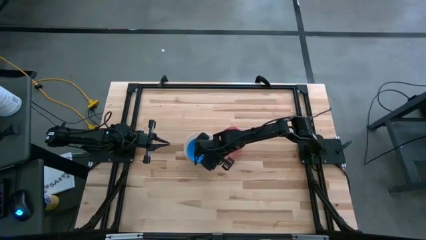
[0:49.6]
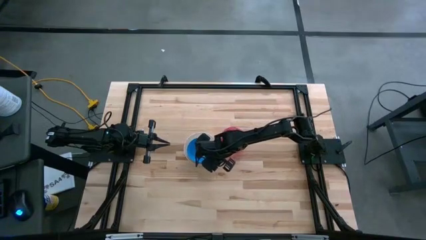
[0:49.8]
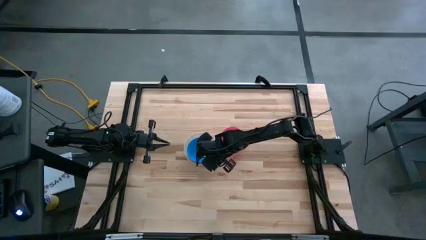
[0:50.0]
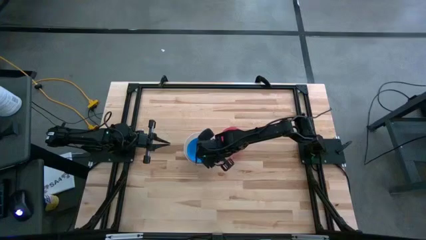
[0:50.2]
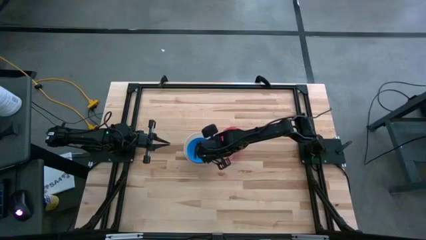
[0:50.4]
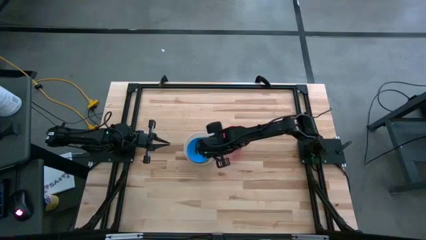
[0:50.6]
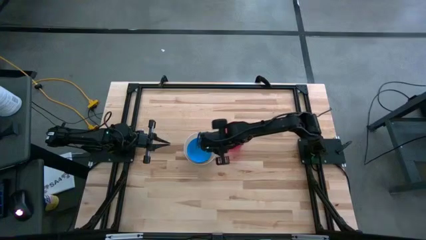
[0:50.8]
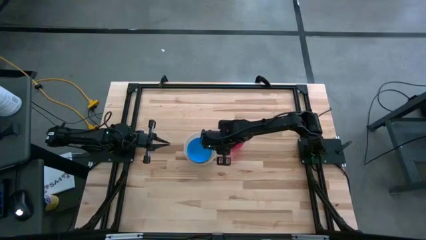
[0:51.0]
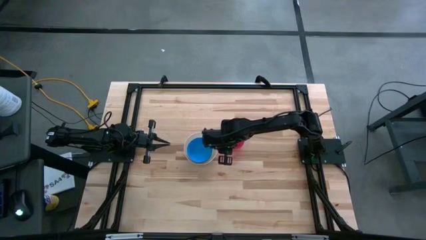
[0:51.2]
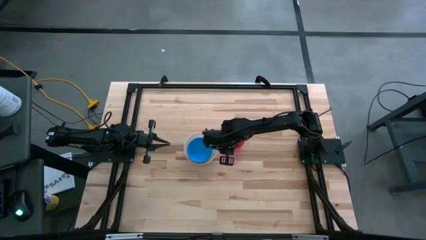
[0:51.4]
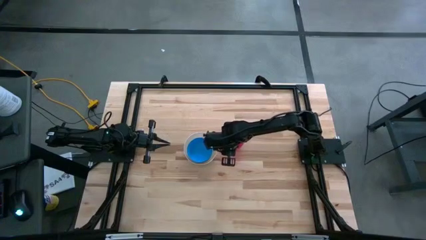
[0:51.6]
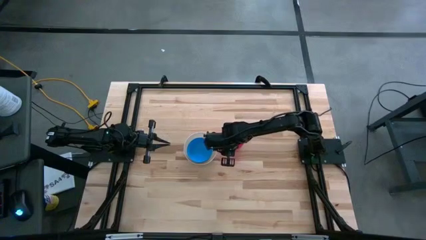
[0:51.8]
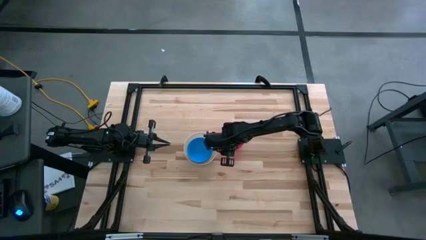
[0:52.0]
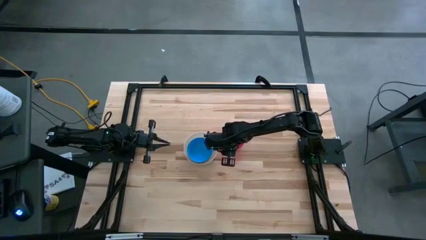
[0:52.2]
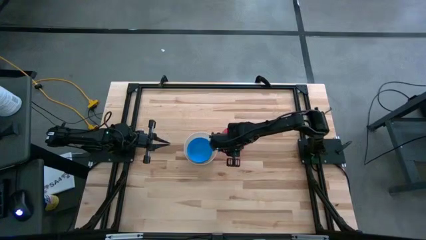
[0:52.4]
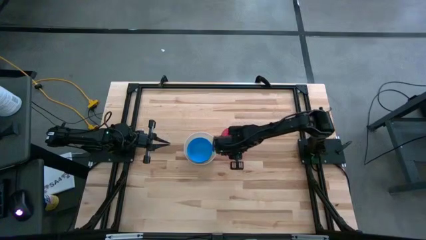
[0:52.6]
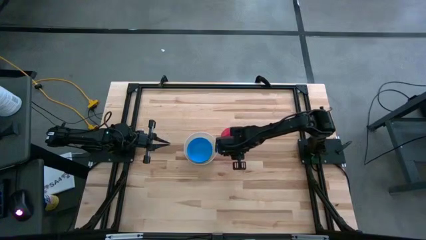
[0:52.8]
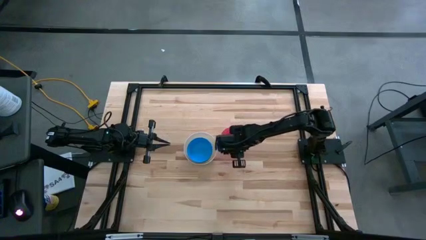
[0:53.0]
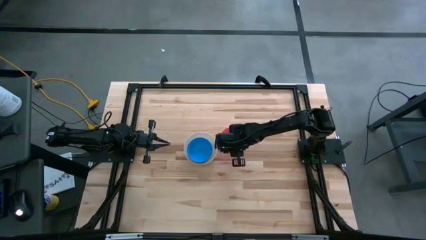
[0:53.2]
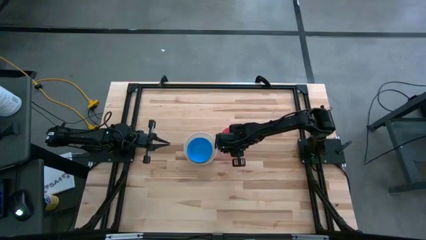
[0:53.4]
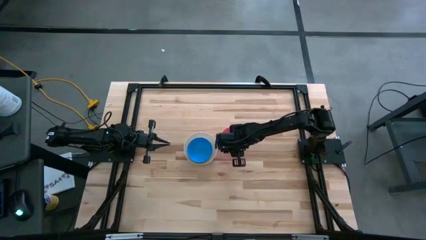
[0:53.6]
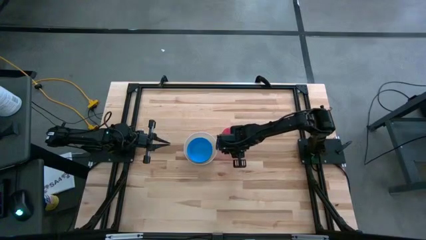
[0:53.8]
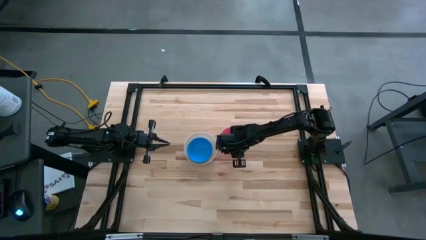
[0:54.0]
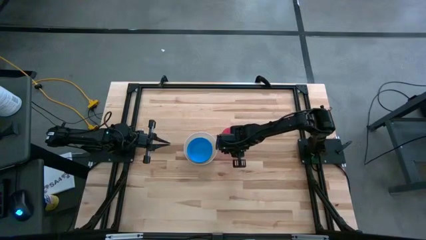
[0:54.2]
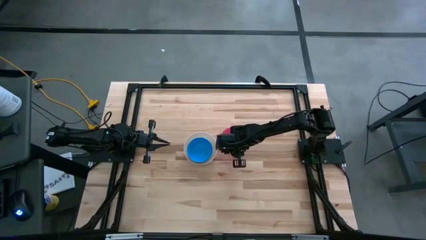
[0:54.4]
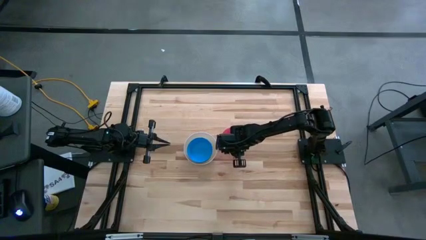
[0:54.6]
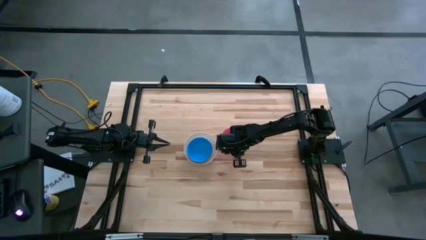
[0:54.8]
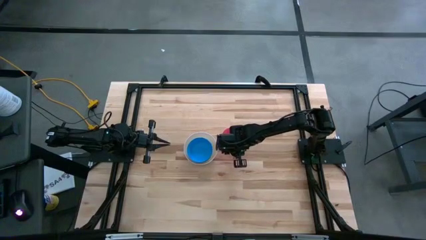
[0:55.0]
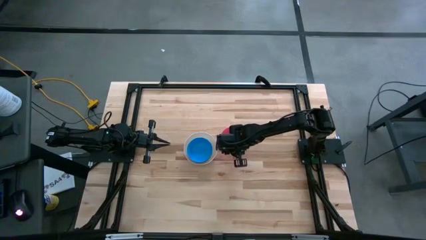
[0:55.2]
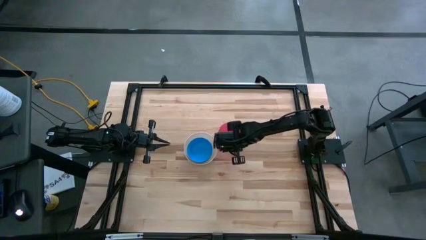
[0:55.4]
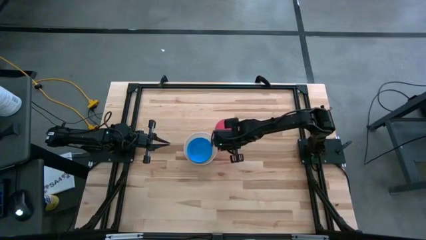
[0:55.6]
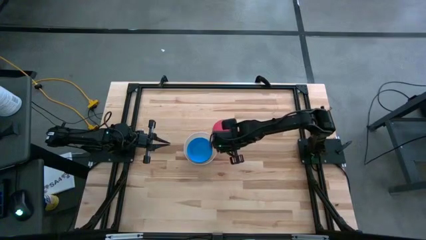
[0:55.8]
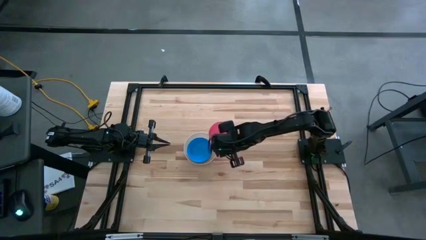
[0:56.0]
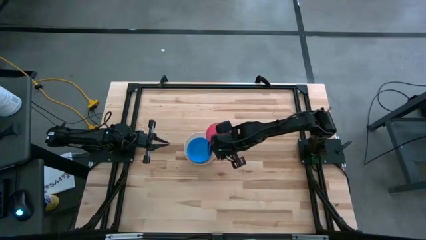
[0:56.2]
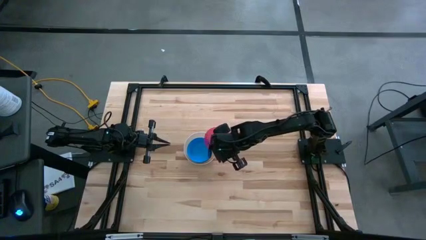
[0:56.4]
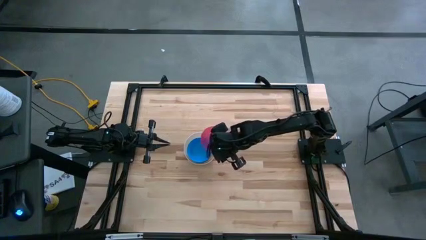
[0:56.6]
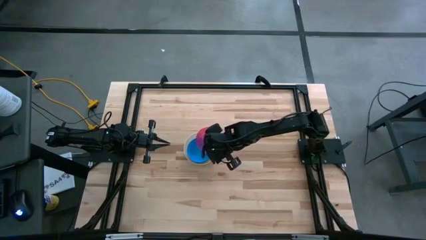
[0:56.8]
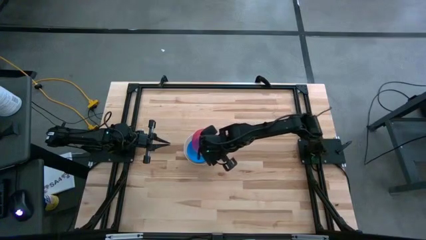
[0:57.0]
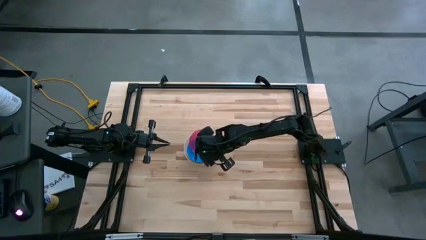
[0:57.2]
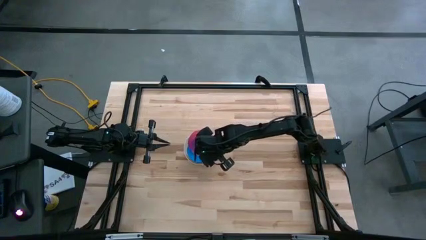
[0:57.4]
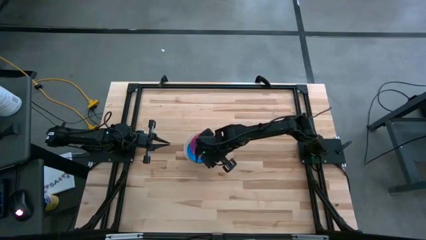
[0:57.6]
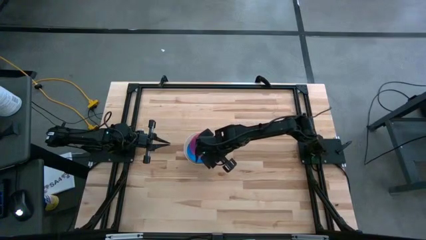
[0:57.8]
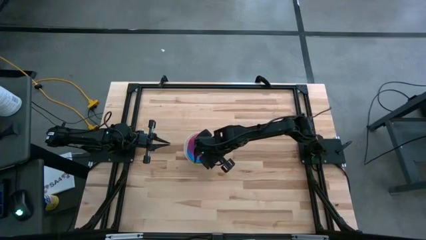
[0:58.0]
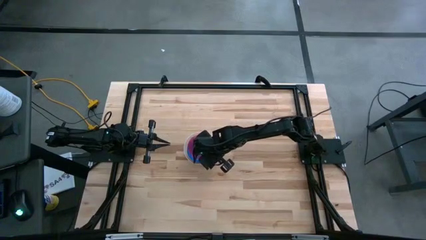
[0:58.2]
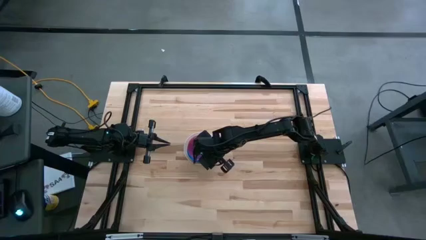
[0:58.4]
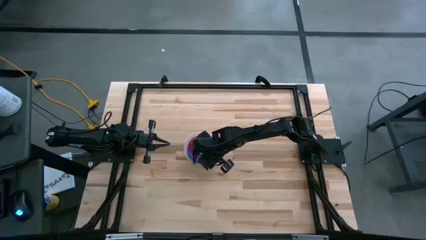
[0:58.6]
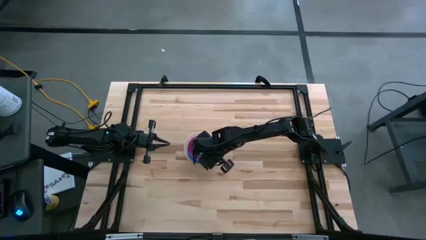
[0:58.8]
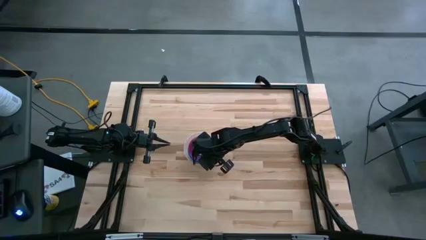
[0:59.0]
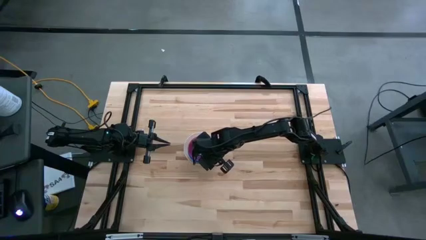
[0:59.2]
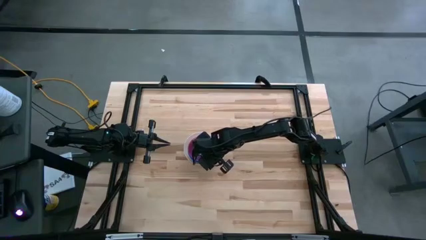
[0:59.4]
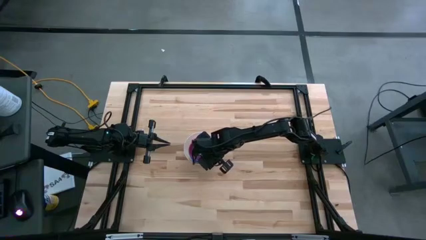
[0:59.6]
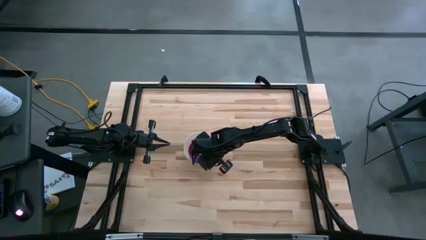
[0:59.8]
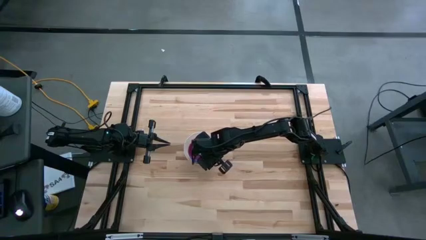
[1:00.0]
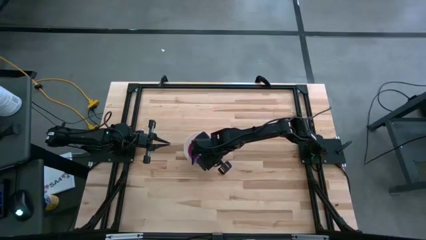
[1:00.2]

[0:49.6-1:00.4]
Stack the red bowl on top of the blue bowl
